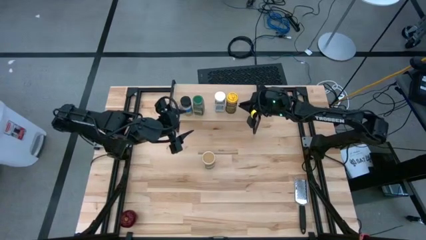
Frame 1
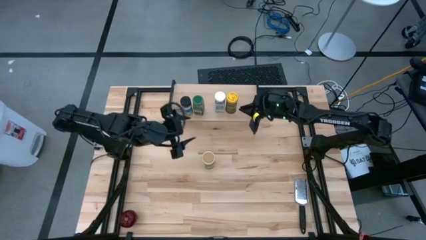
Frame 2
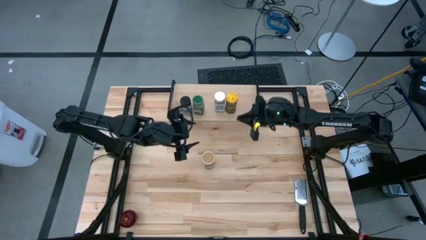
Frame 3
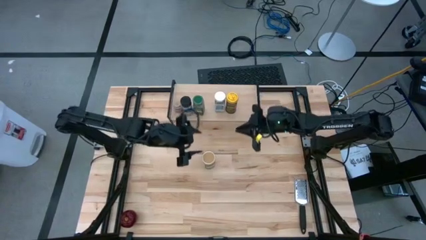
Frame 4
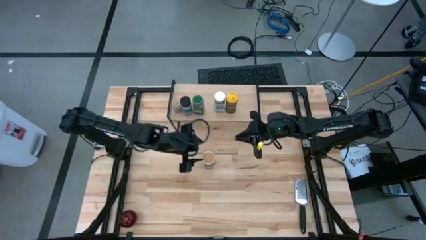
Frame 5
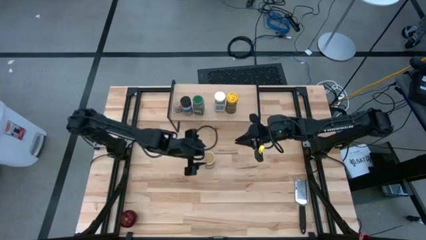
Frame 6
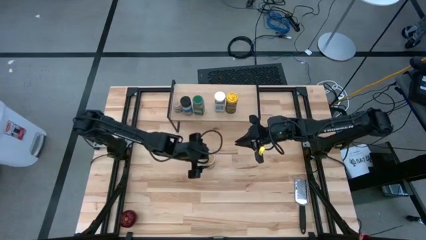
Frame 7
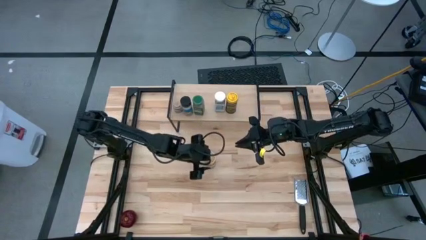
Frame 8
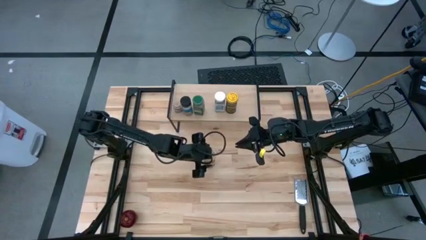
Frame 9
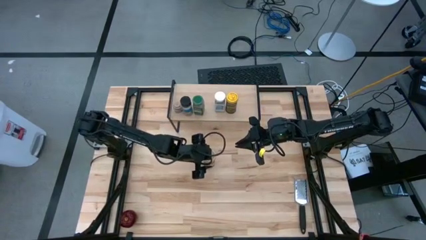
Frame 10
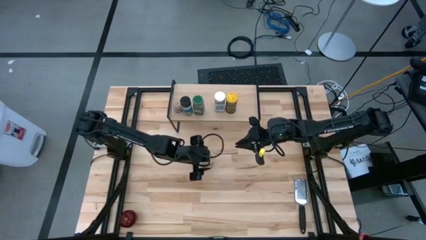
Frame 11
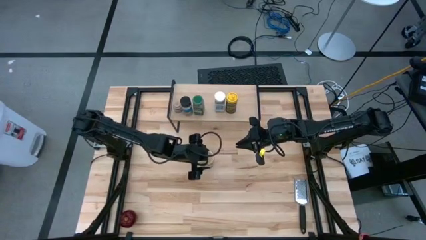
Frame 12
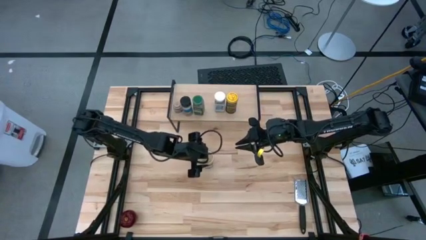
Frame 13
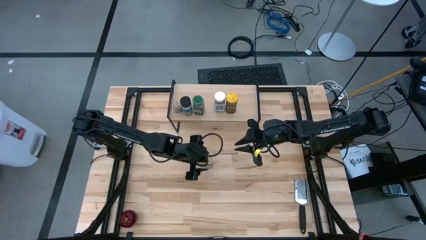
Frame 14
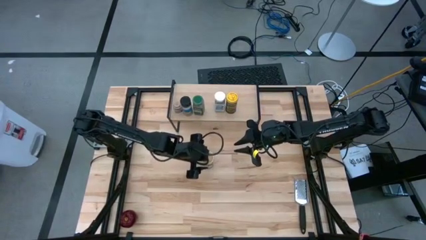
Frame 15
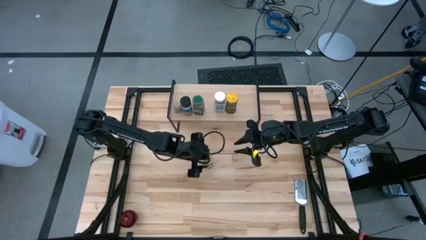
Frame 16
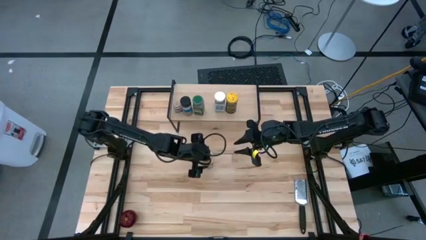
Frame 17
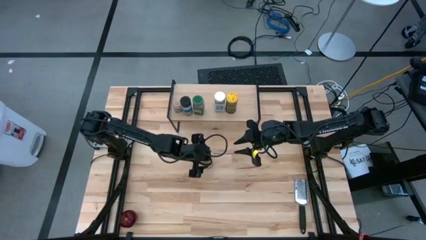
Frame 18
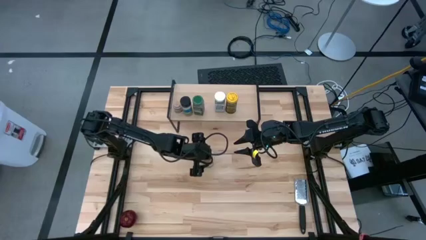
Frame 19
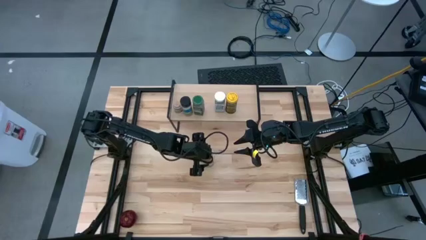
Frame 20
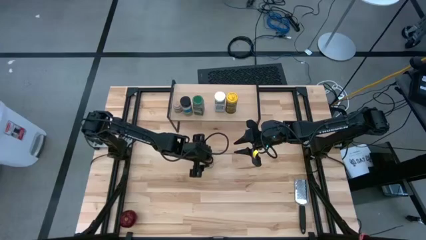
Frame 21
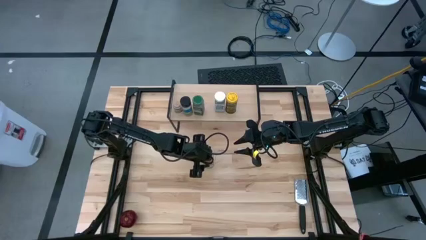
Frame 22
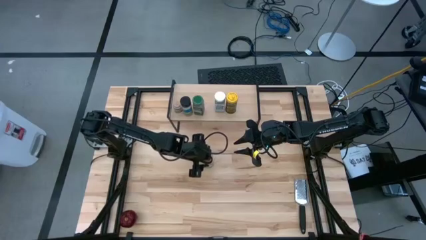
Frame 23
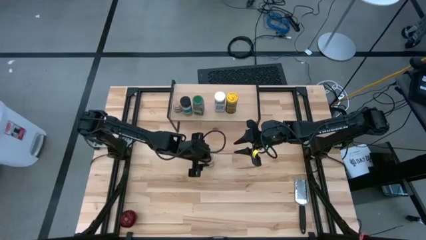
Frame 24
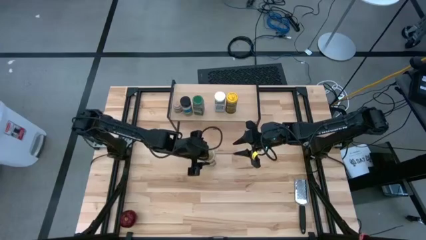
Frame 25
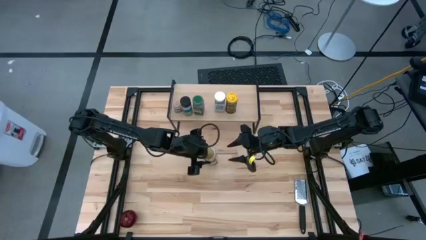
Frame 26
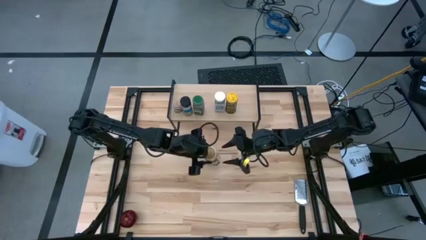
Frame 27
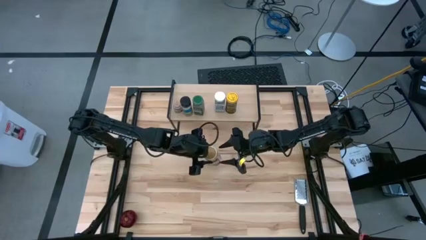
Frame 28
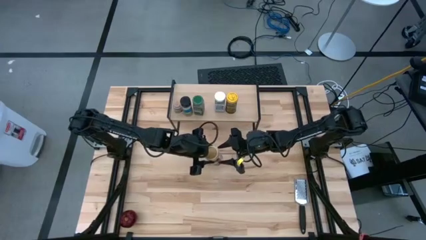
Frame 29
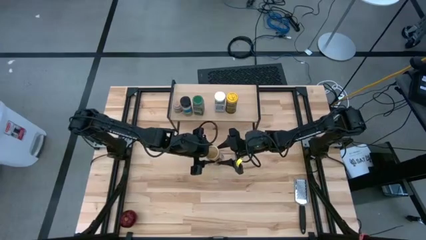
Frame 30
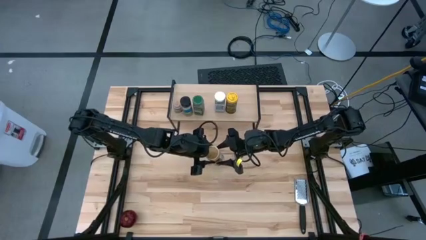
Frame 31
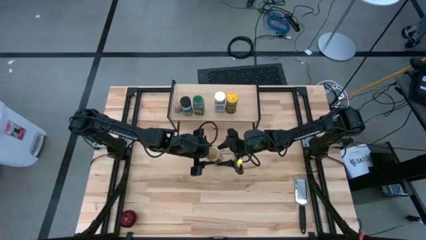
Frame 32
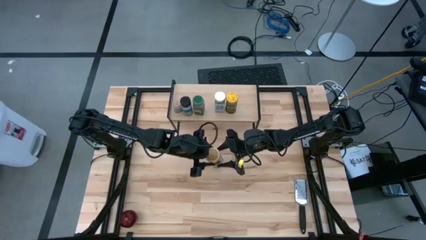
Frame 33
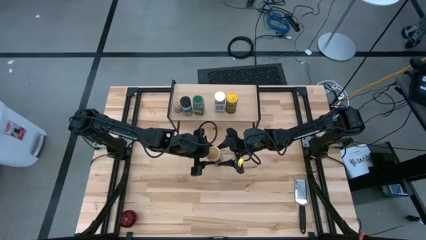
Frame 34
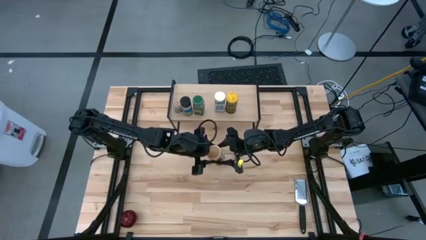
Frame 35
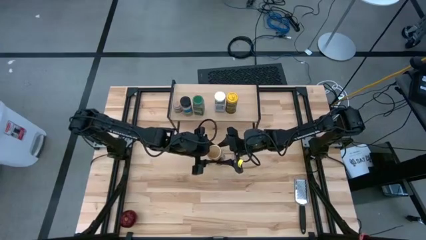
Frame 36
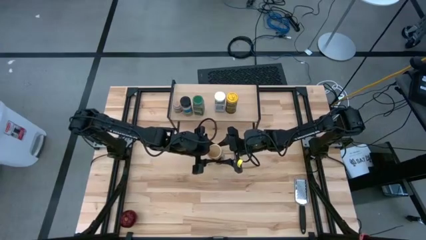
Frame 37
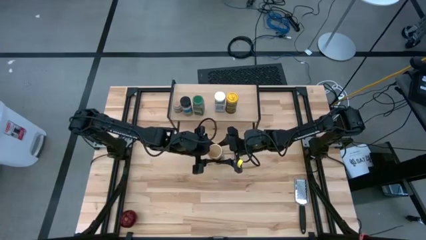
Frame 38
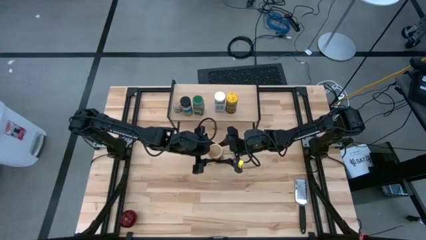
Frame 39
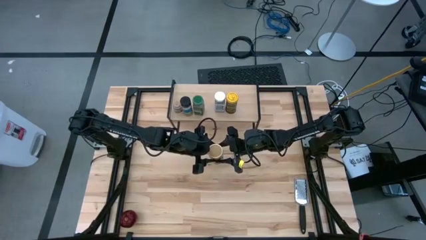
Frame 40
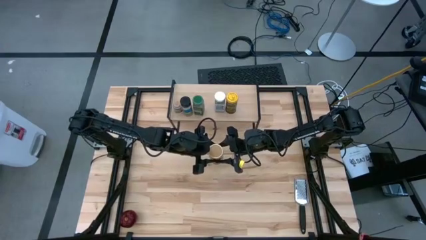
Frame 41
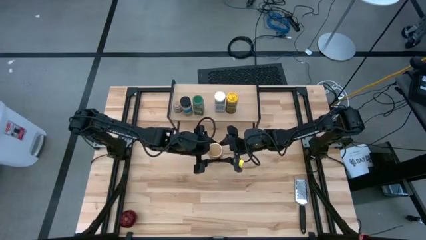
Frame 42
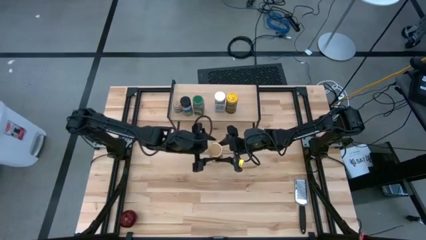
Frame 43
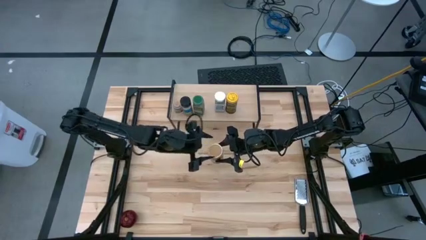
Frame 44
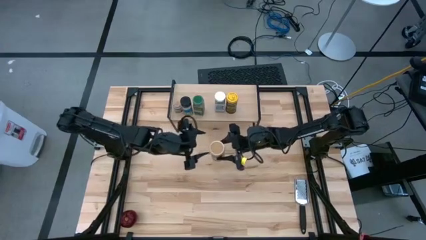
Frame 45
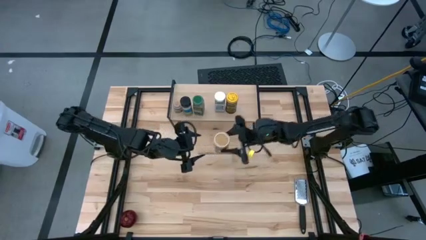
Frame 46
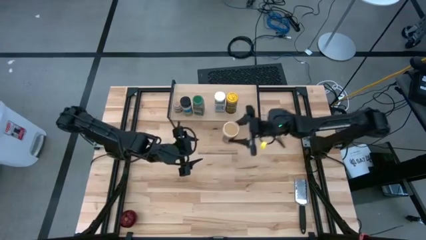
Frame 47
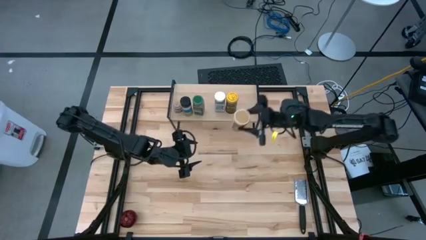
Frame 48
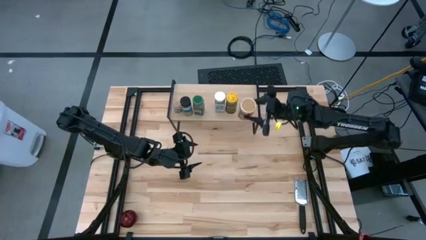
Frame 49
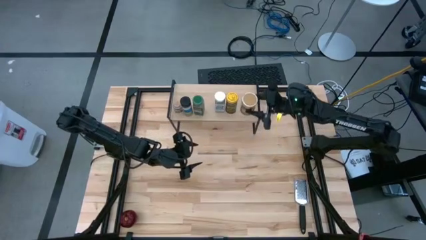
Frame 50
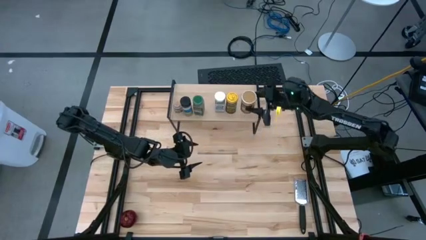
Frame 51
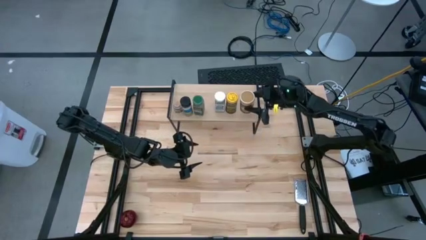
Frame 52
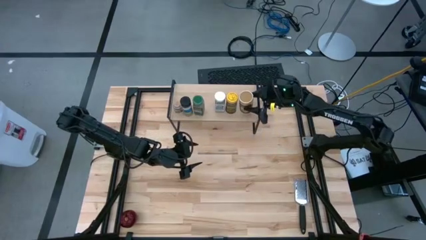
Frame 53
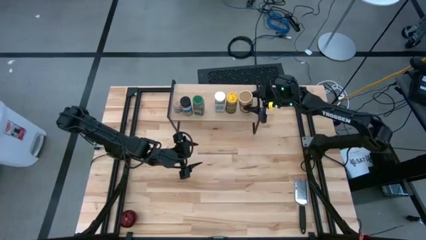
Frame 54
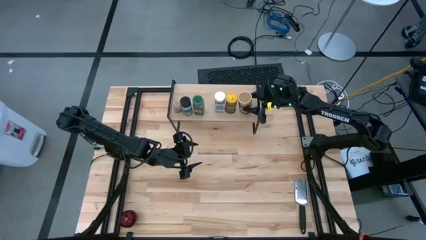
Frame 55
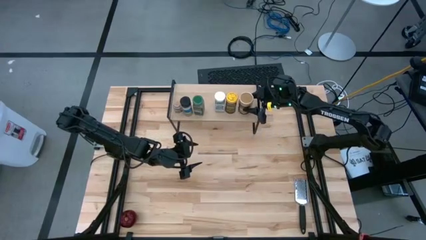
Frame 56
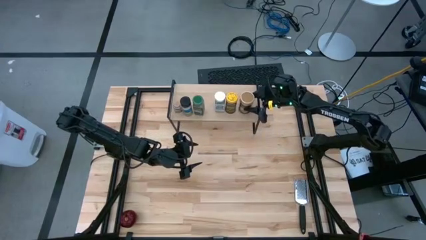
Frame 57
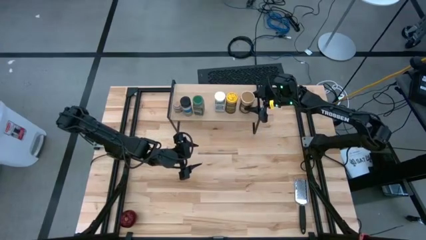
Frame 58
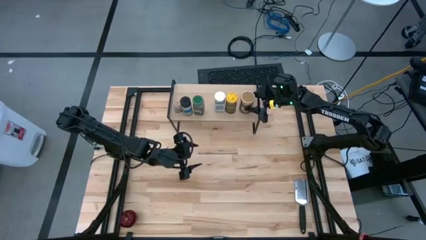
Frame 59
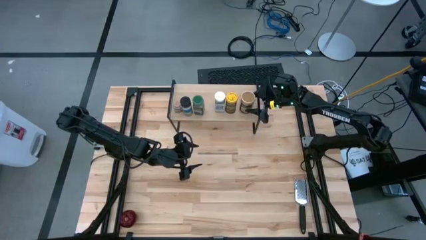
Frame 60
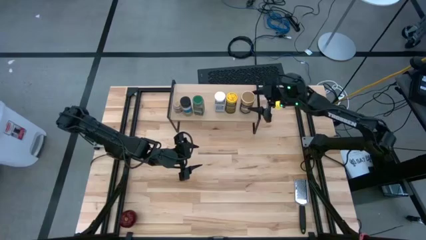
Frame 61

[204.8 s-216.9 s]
Task: Shelf spices
Put the brown seasoning bottle on the shelf
